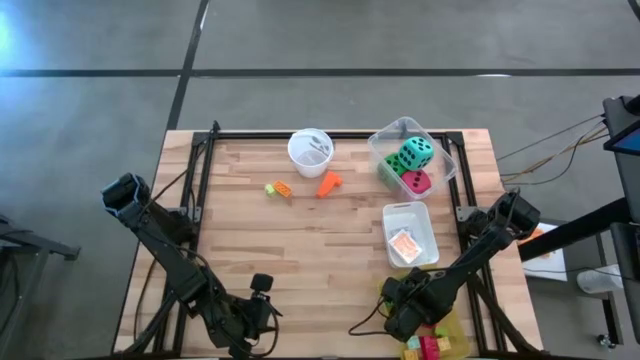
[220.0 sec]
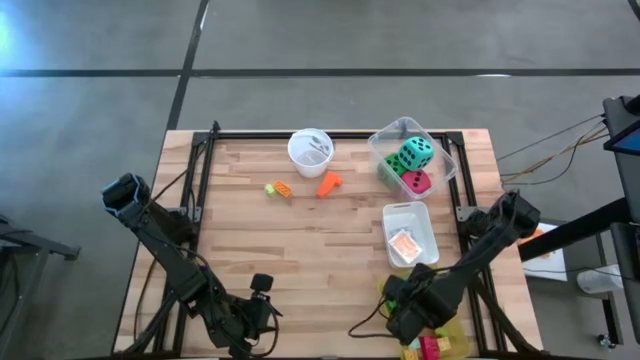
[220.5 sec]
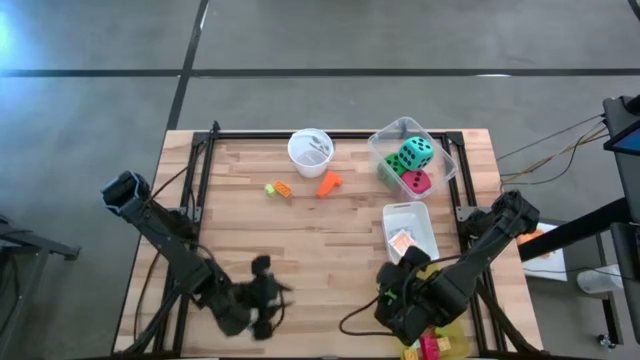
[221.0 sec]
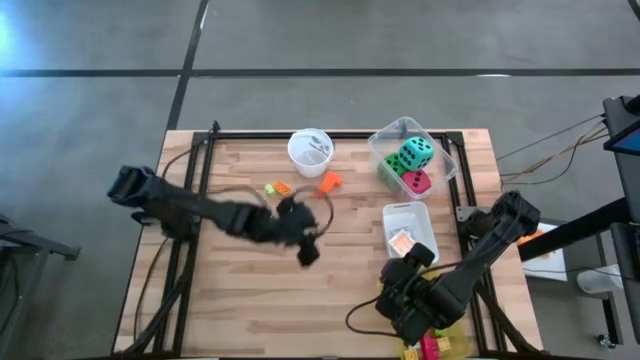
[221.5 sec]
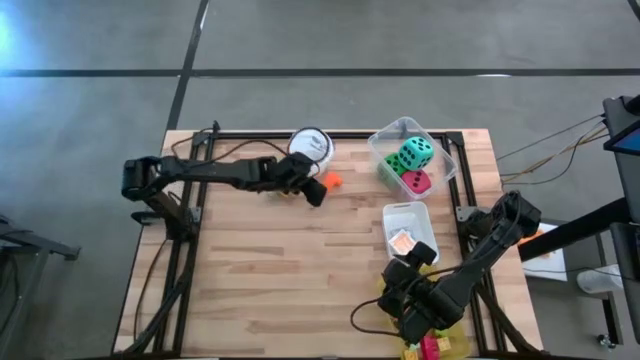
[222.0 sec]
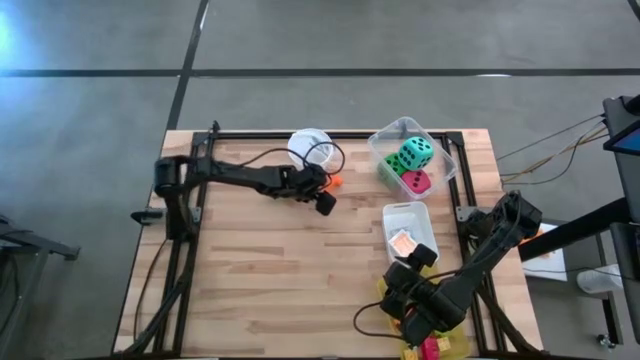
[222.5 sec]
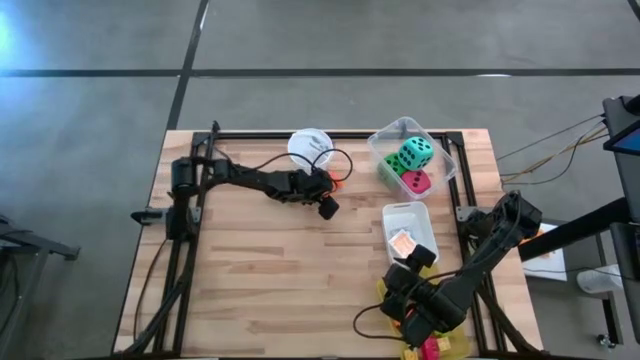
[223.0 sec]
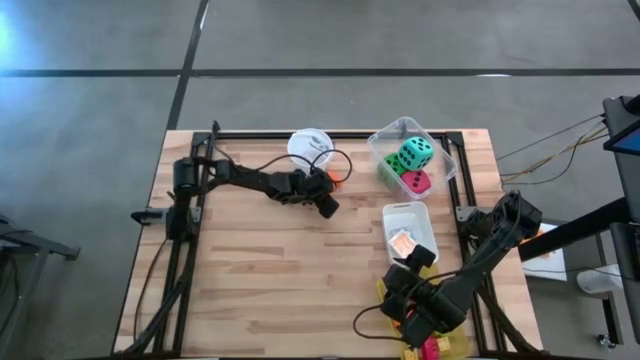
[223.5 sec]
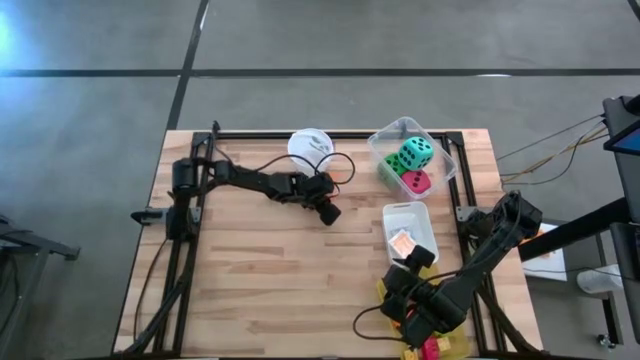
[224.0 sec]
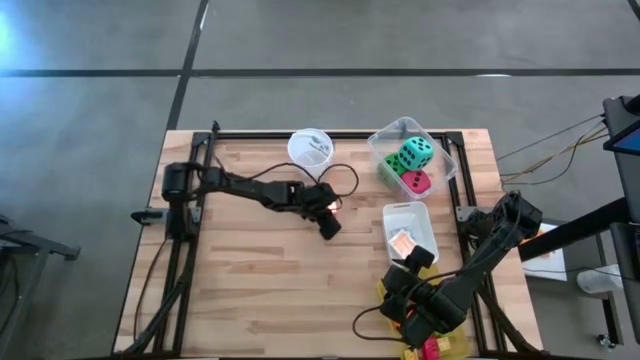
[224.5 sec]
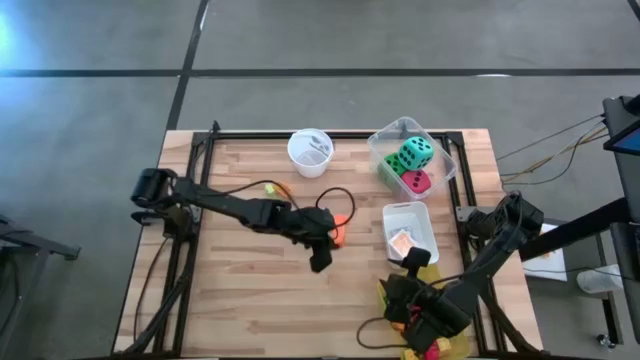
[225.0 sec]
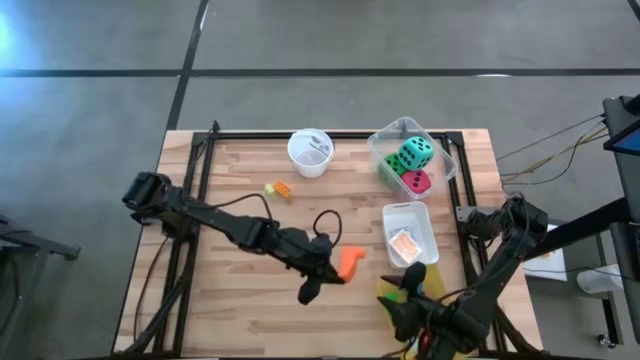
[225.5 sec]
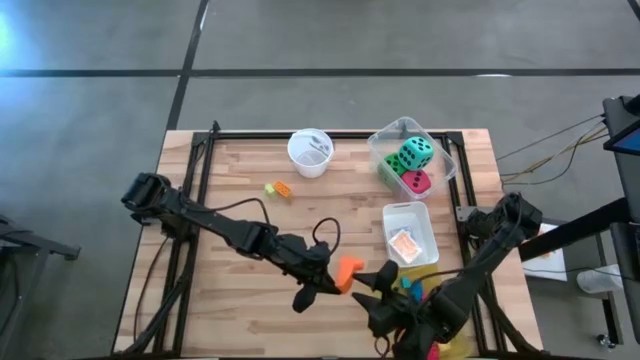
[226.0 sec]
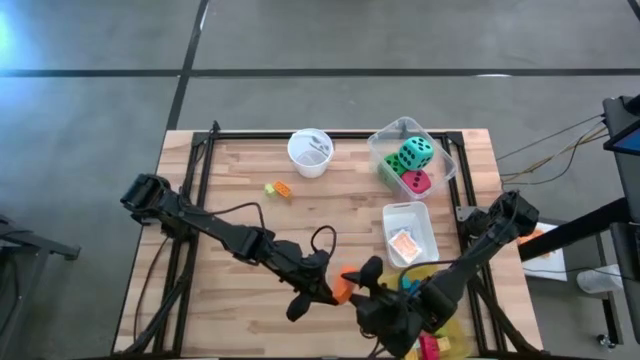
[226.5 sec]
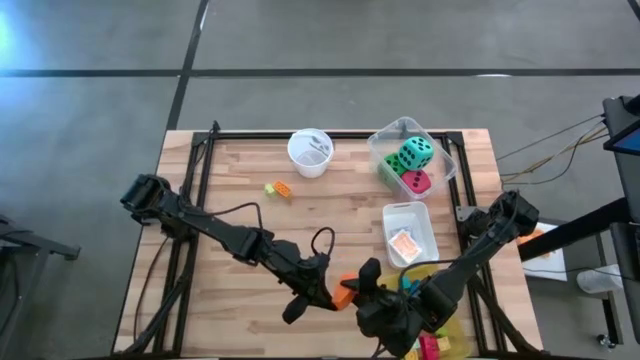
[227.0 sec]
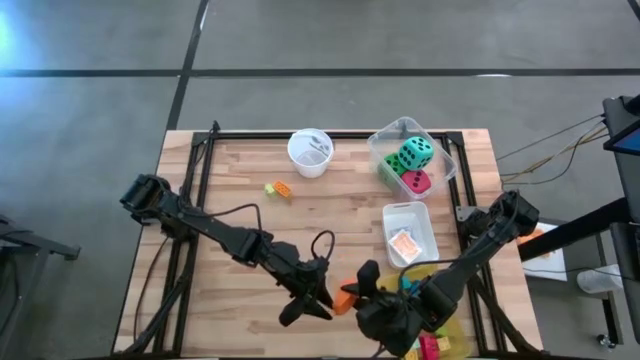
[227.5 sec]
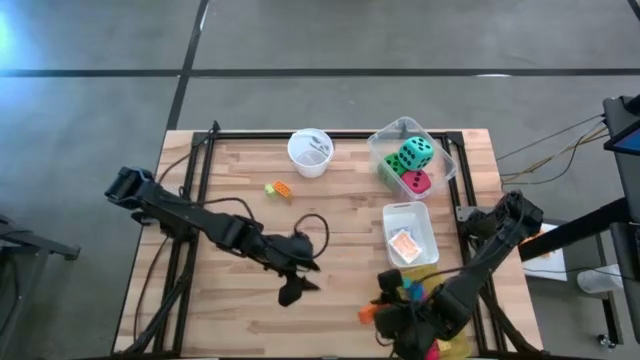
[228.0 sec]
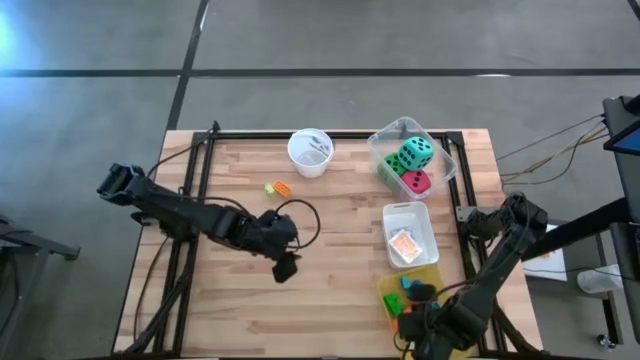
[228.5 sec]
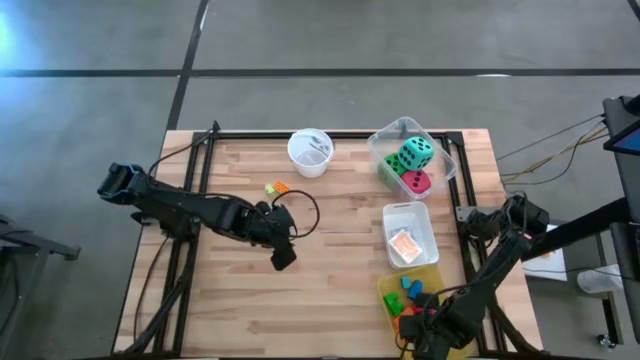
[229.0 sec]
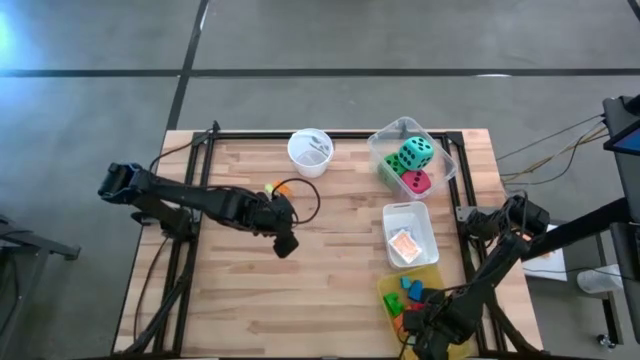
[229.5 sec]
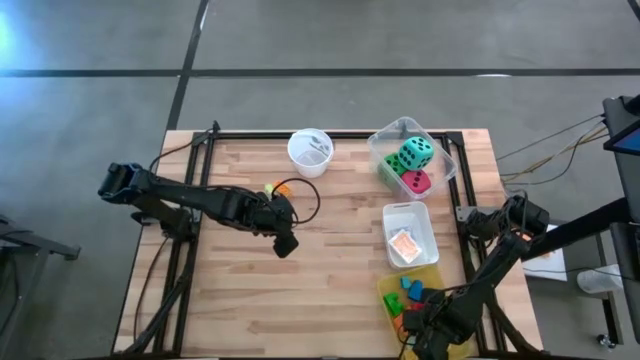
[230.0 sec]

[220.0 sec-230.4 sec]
Task: Pick & Place Toys
Put the orange game piece into the yellow bin

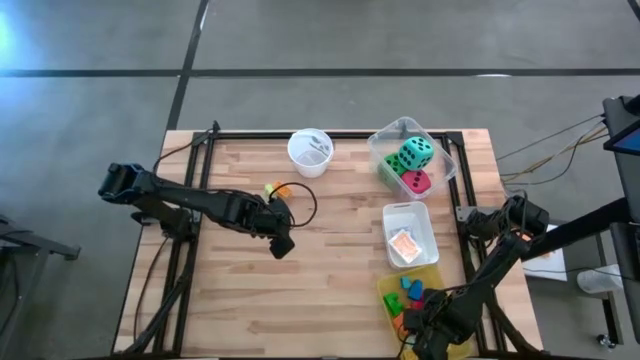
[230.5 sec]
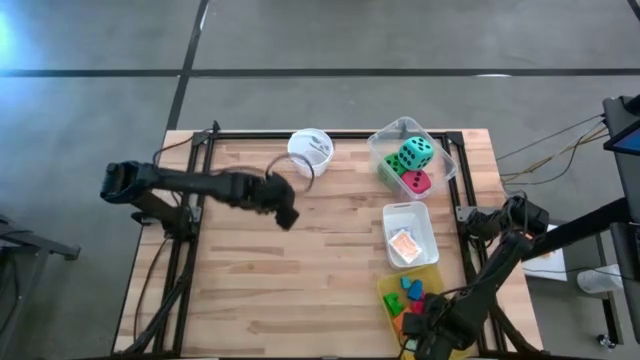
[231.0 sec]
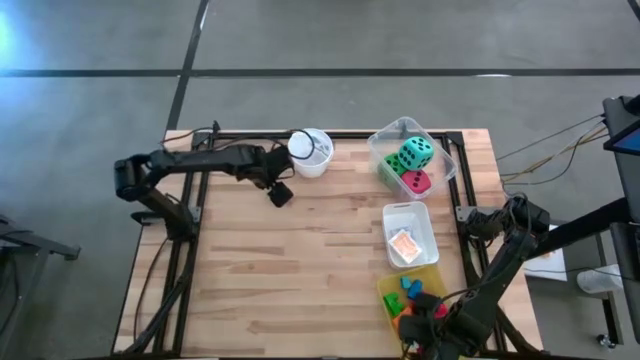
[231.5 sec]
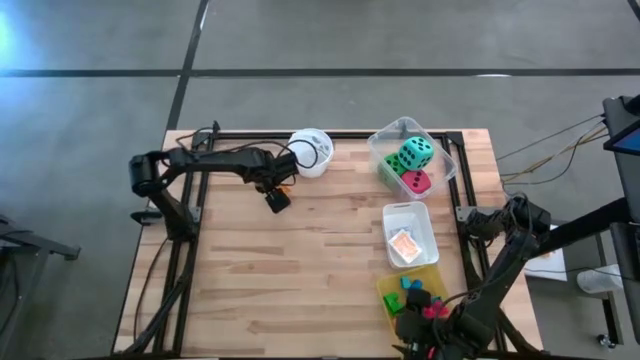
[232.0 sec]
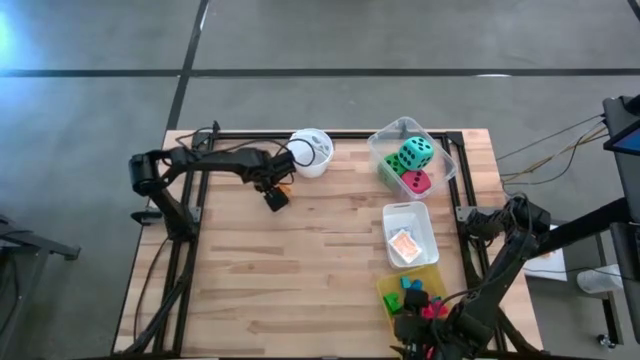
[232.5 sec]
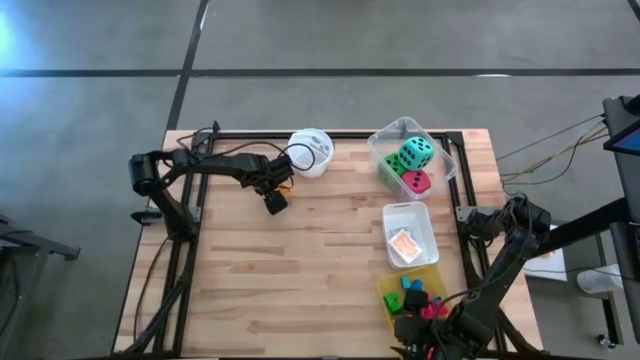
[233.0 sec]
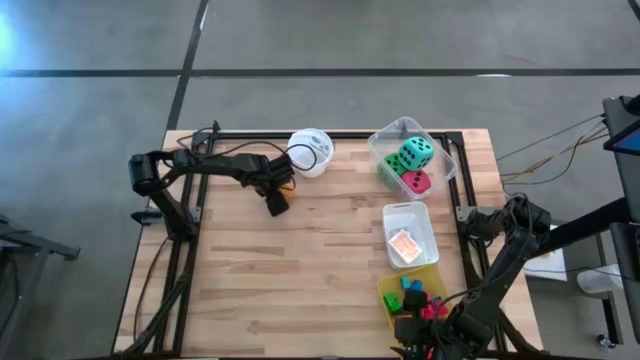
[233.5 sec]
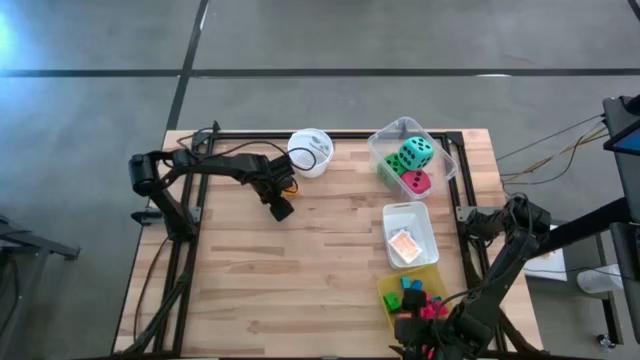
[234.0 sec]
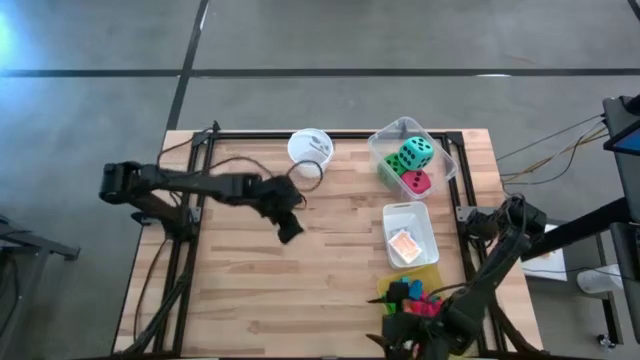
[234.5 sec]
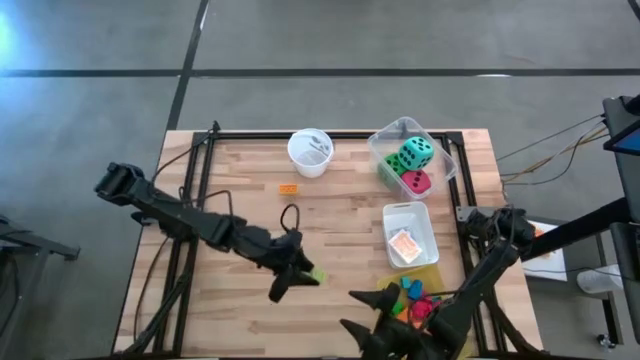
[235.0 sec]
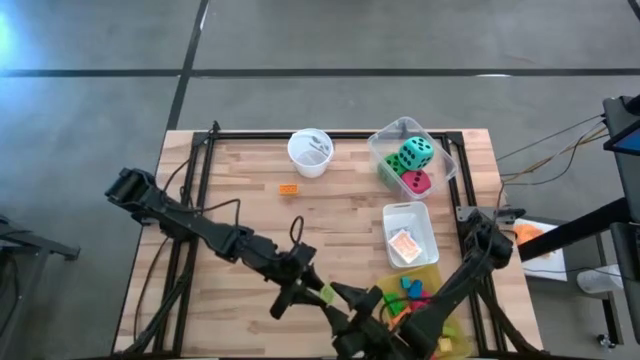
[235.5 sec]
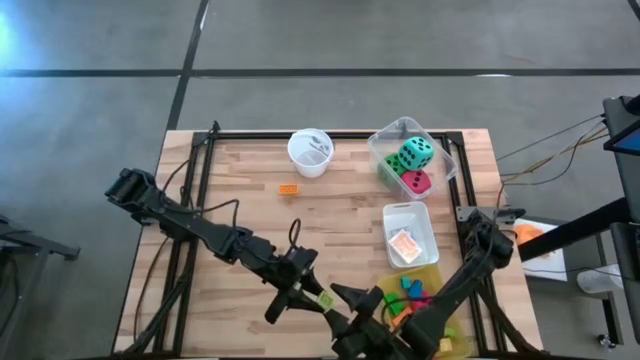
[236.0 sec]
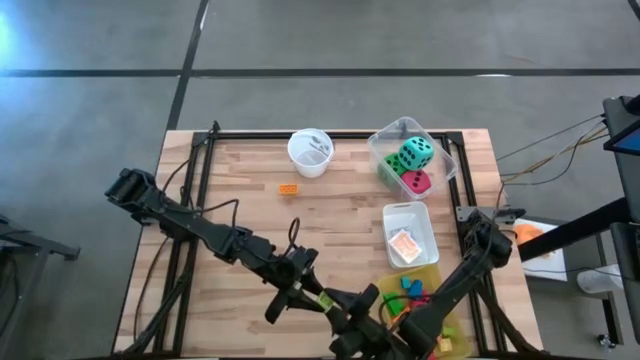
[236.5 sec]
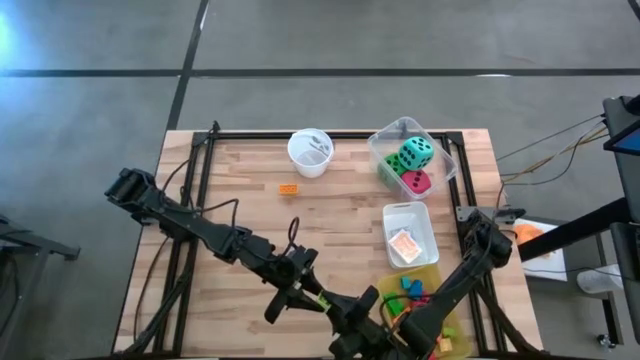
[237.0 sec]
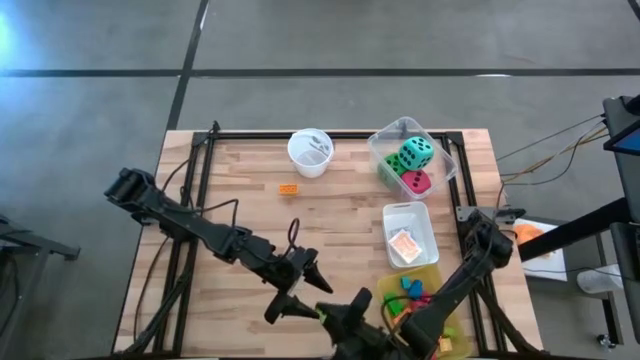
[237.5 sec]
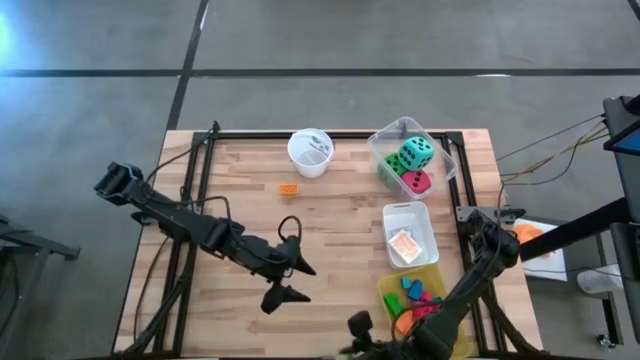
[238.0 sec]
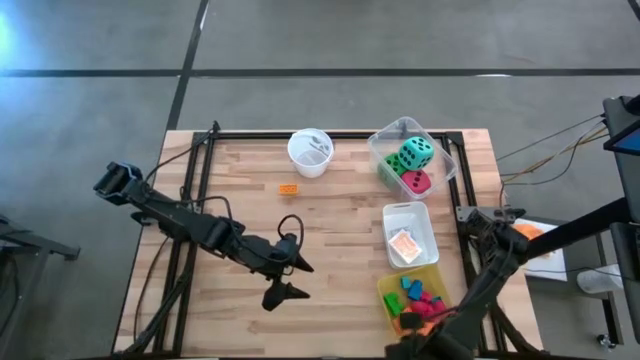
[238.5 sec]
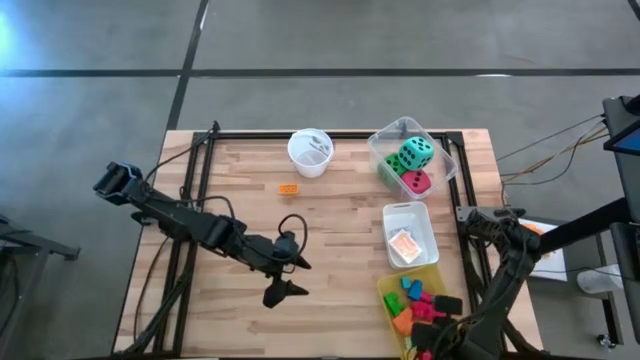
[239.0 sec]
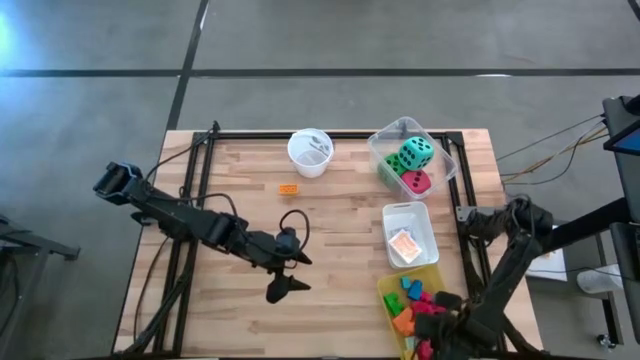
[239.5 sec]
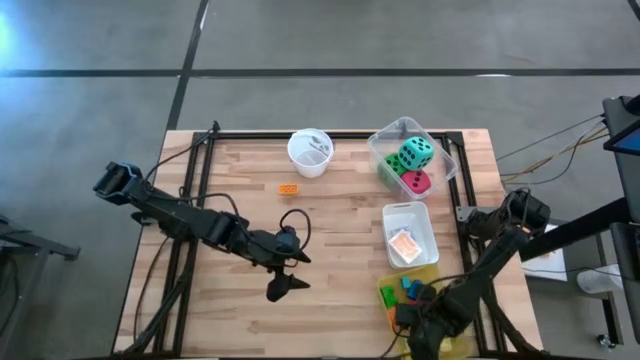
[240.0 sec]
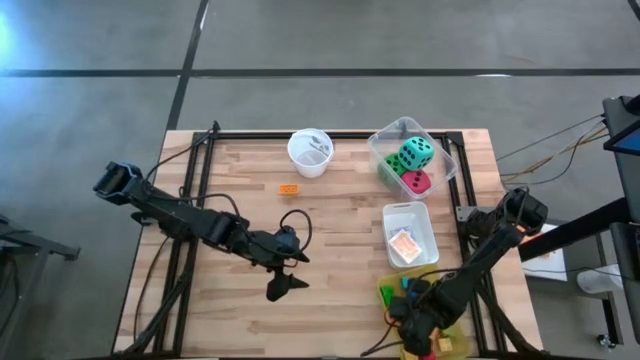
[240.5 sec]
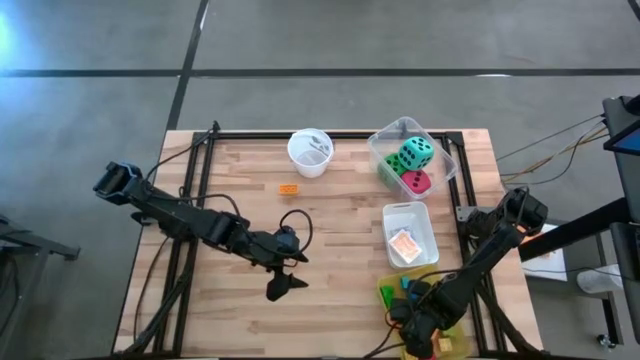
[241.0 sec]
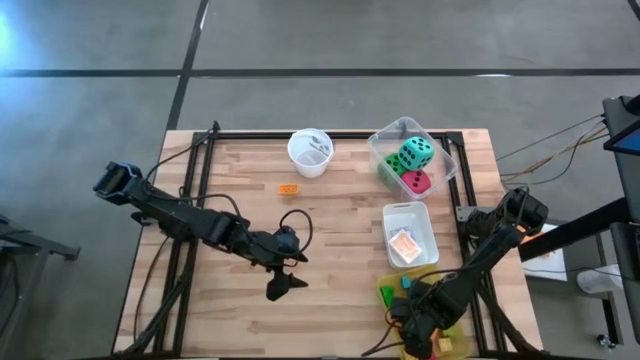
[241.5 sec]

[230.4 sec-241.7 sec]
Put the light green game piece into the yellow bin
